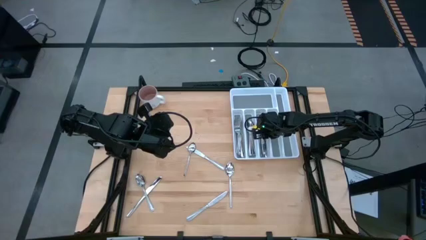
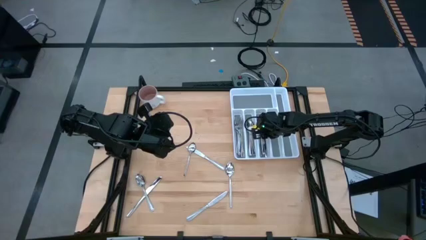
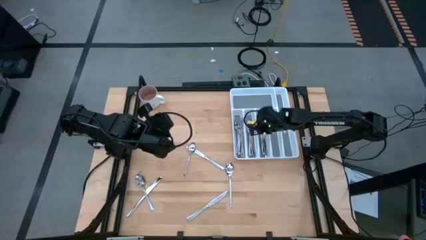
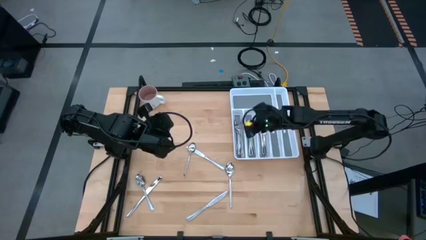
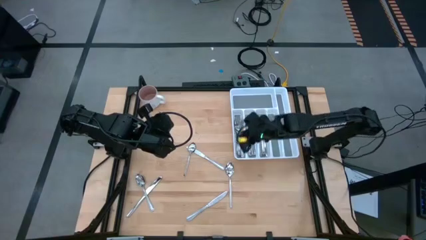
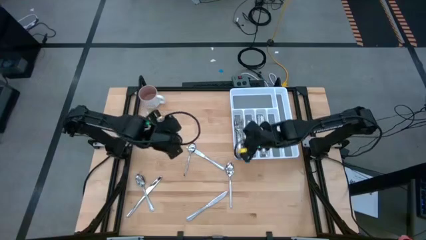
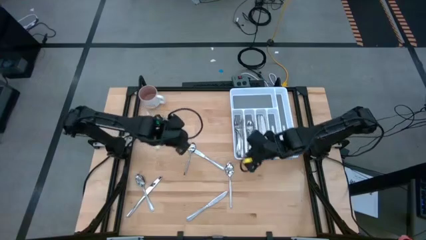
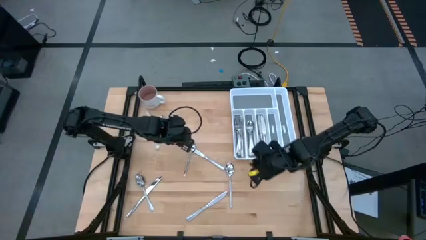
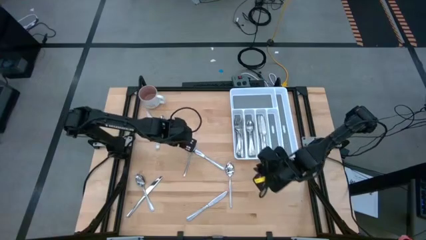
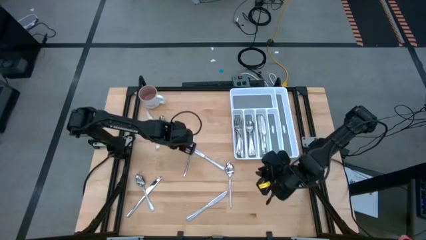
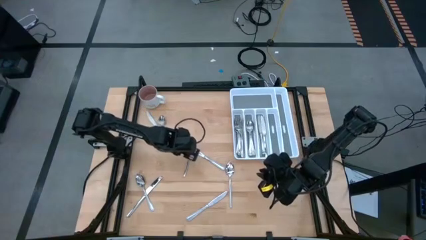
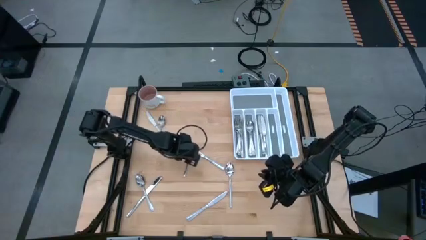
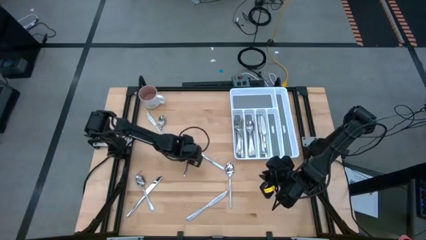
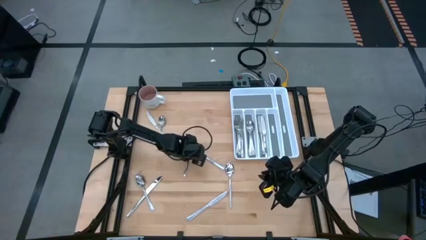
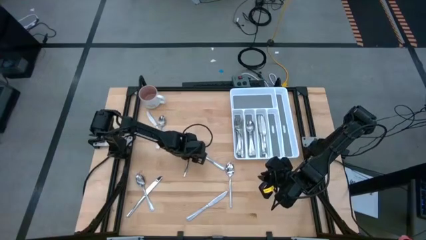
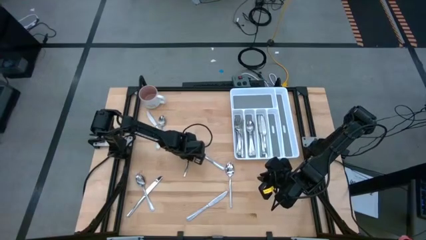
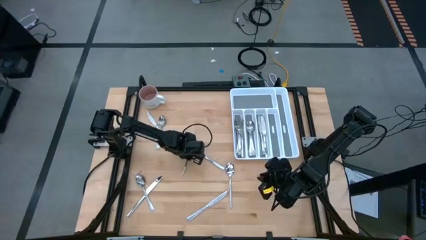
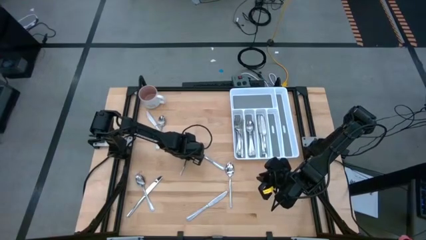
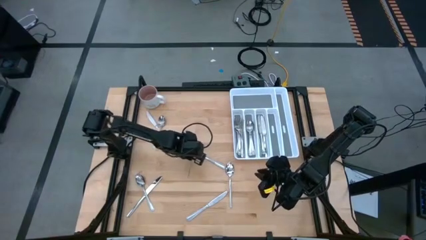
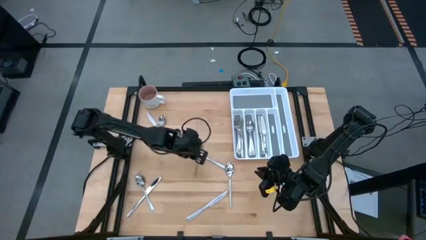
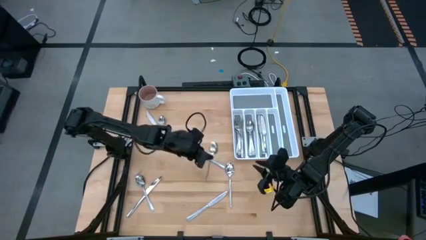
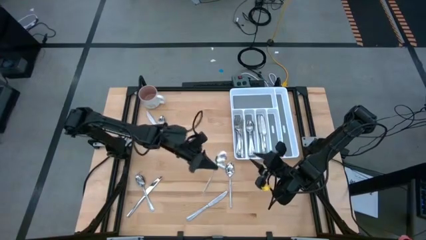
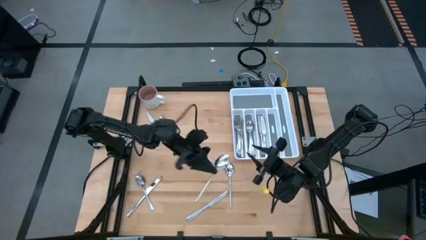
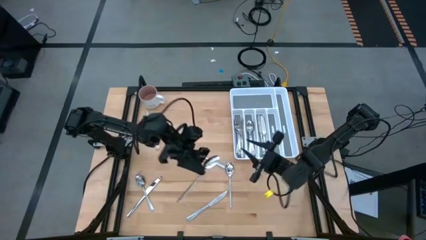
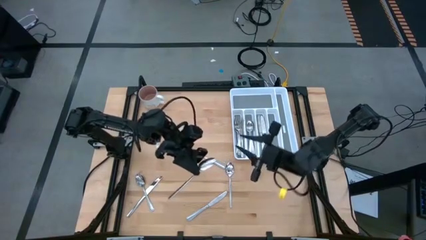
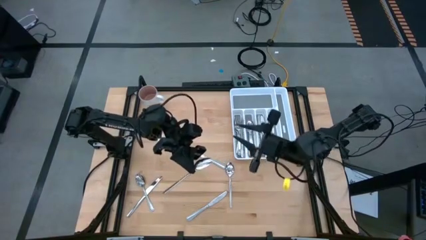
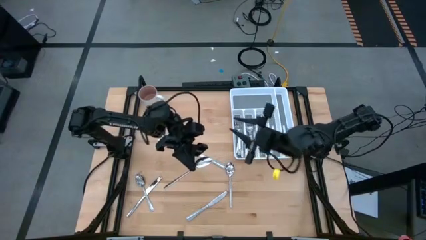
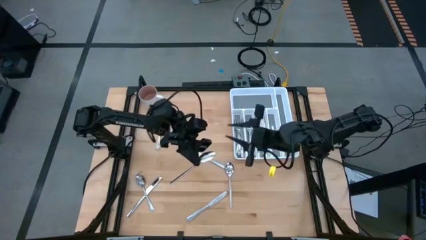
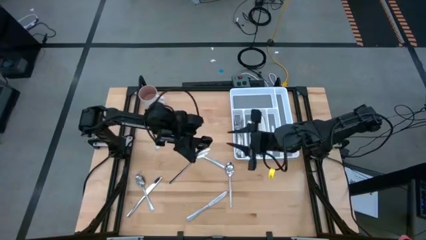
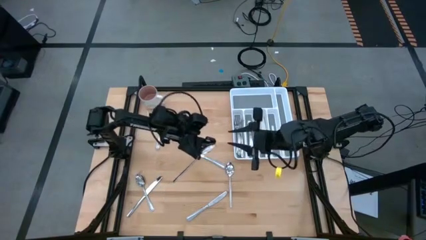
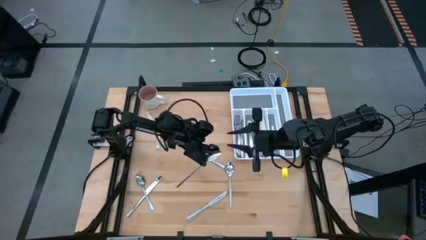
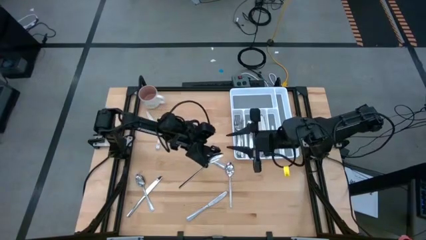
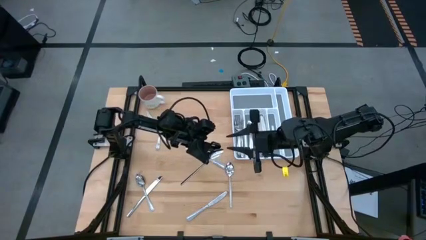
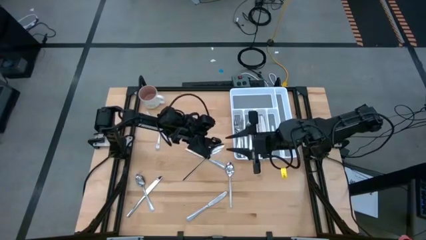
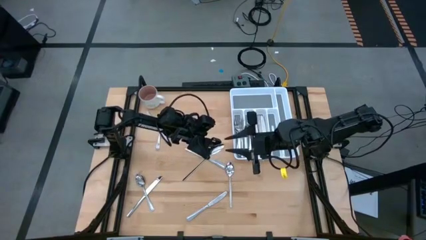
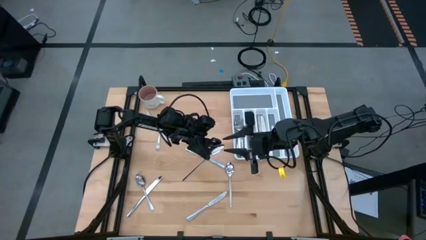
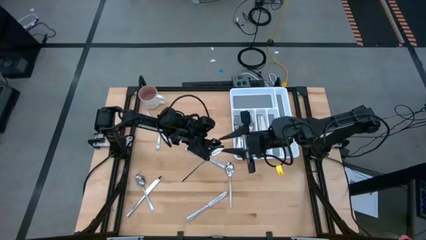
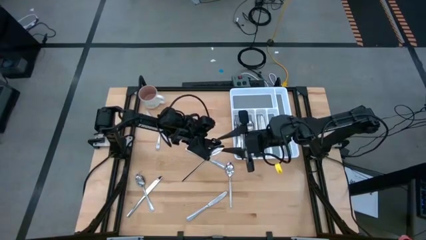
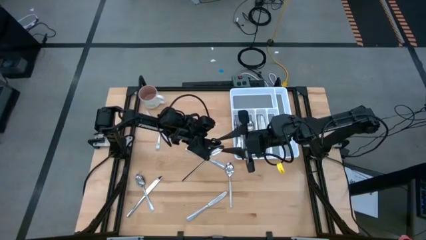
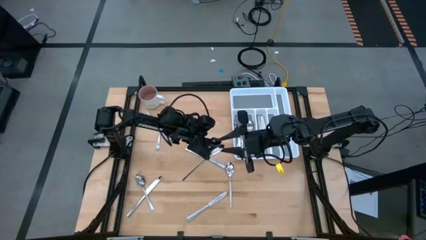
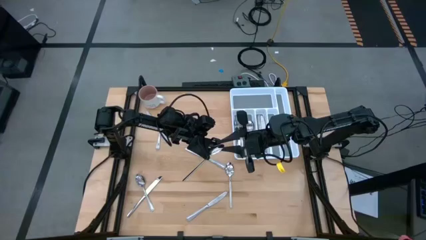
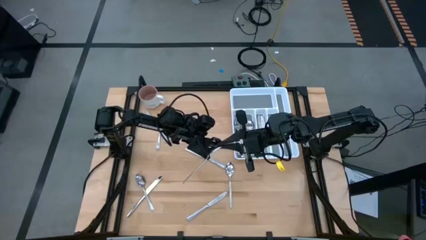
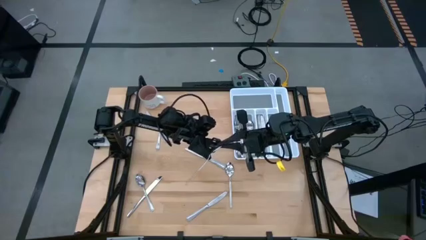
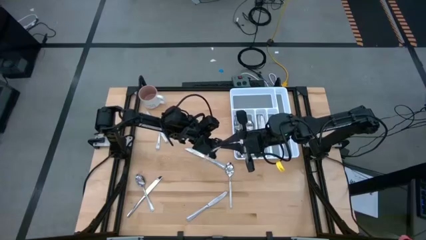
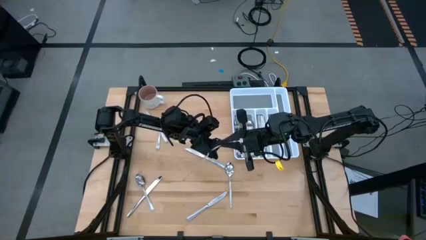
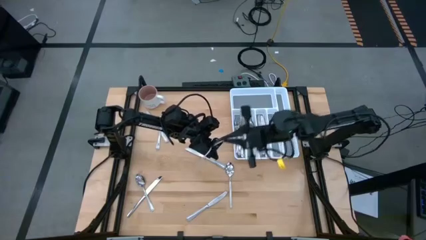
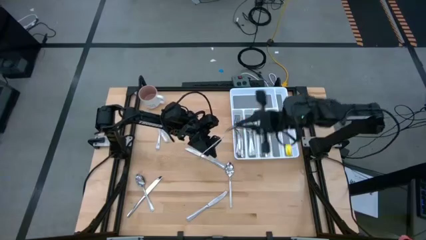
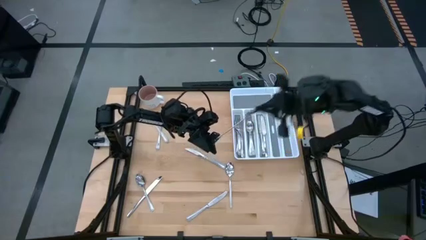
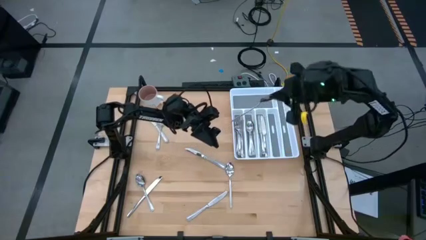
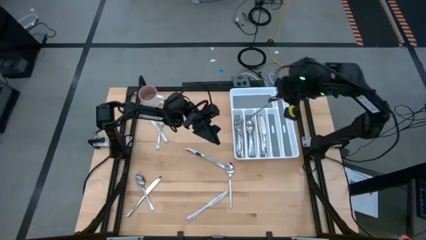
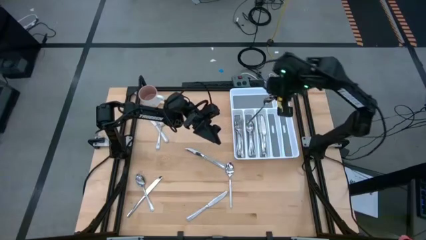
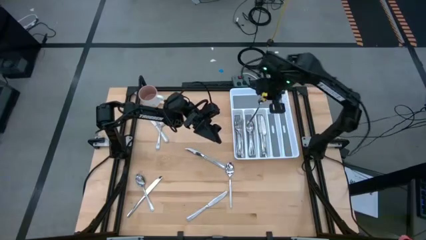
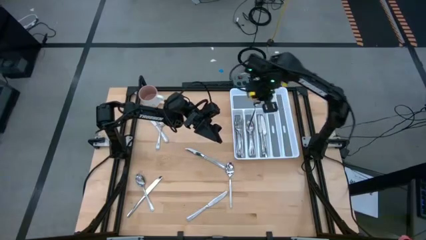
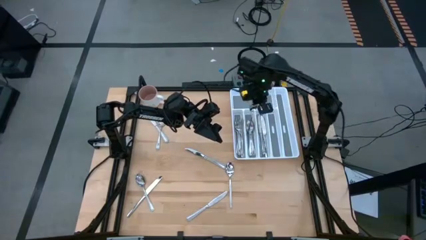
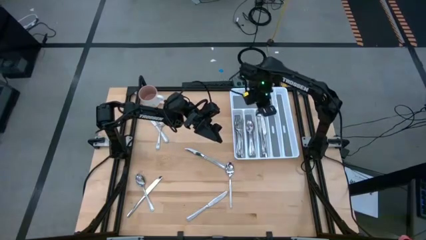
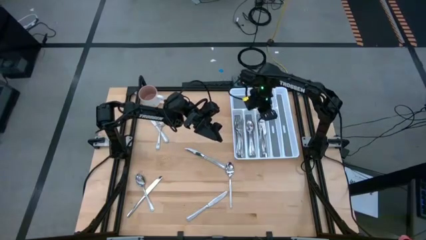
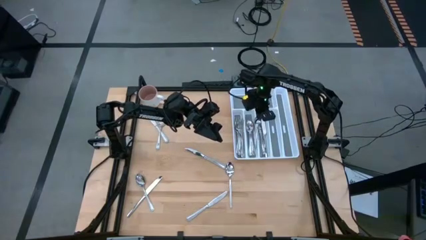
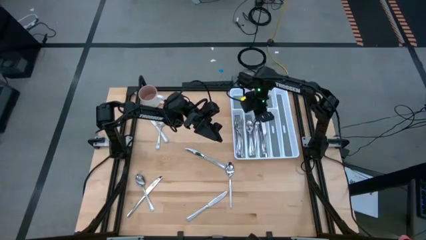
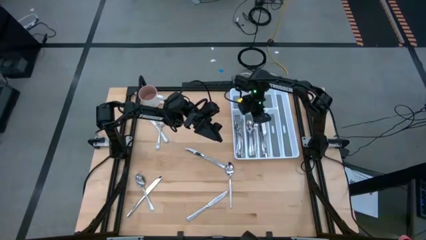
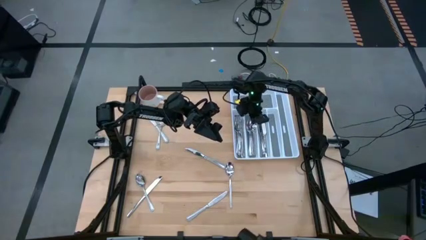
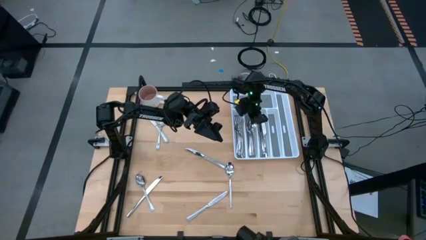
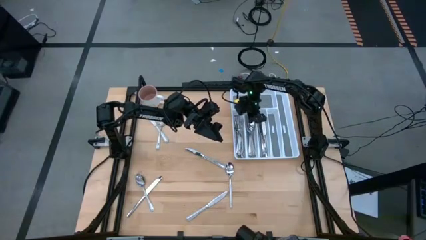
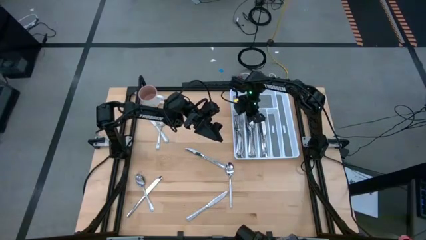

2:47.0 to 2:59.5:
Task: Sort silverware
Put the silver spoon into the silverware tray

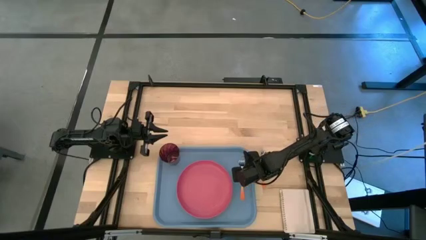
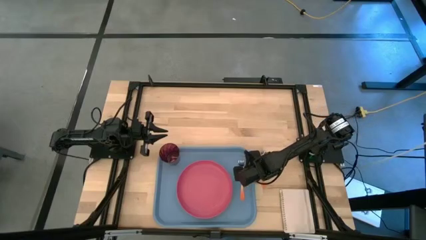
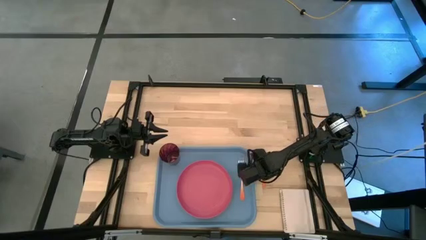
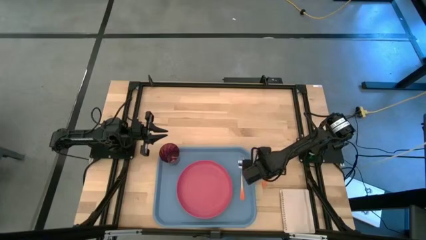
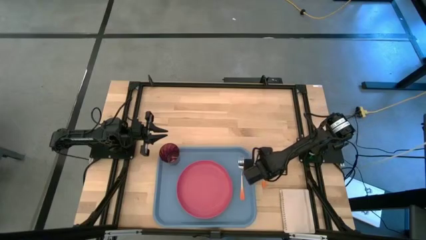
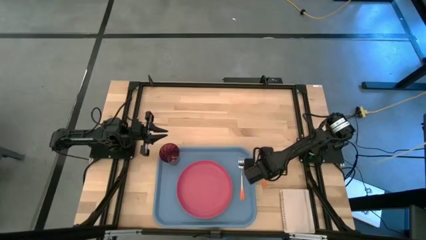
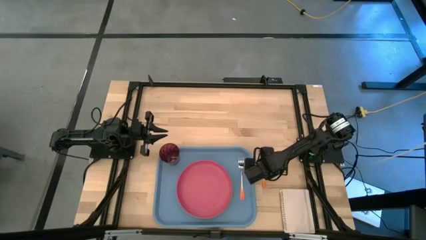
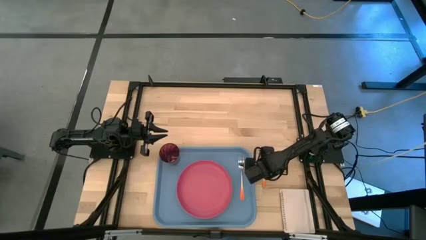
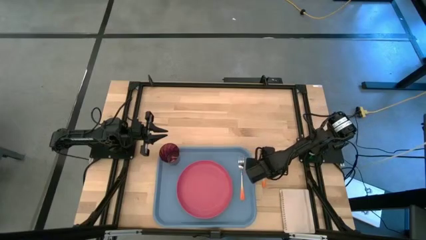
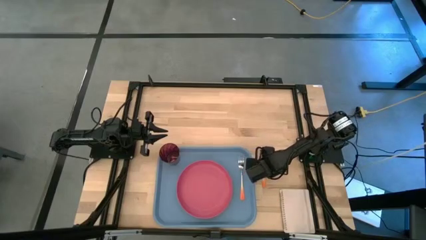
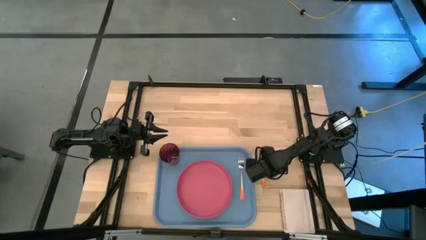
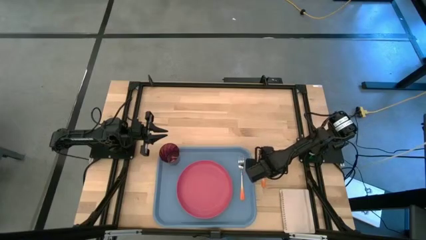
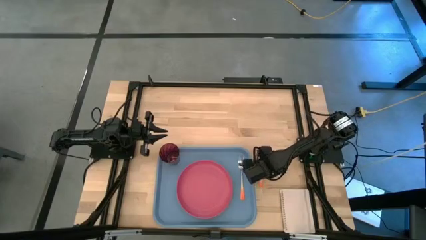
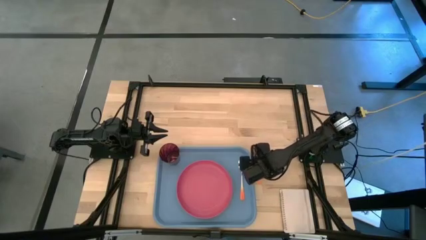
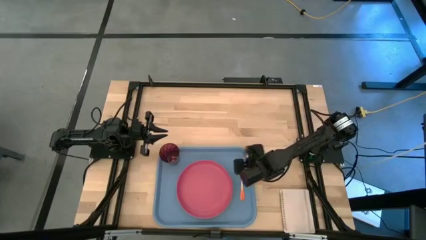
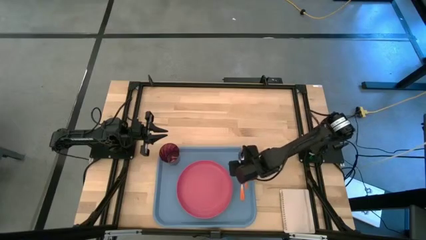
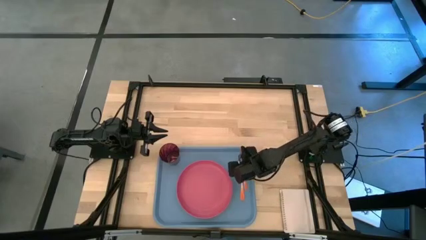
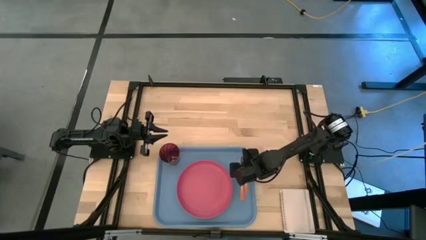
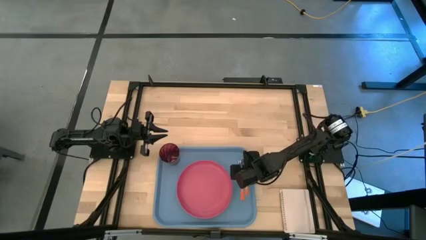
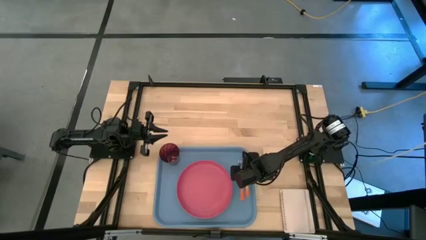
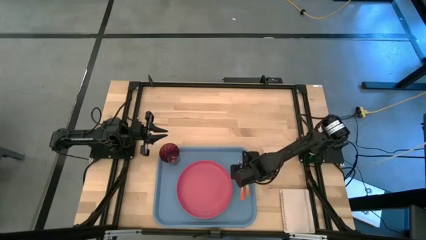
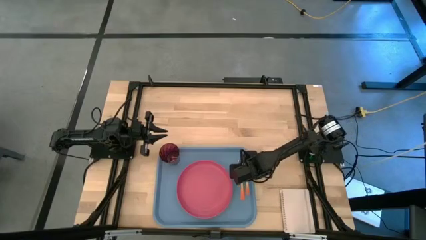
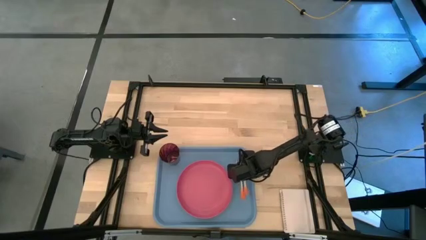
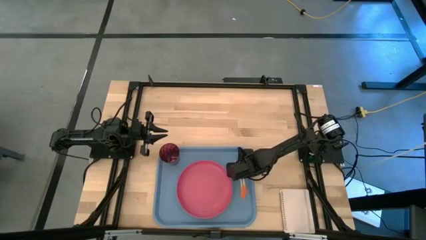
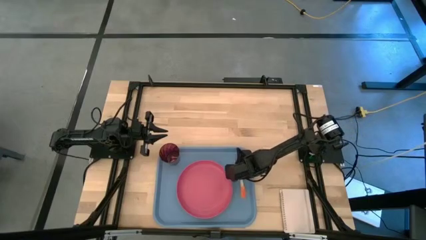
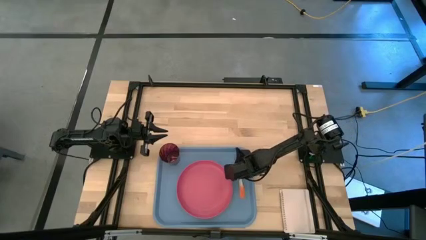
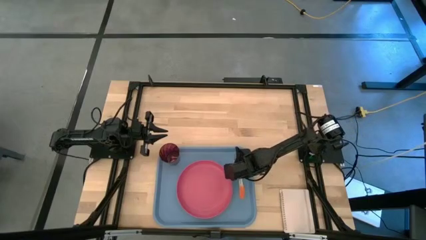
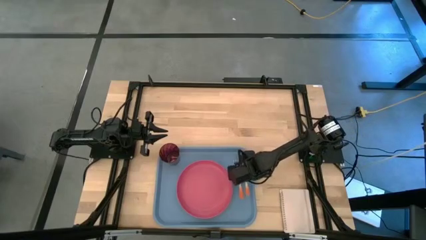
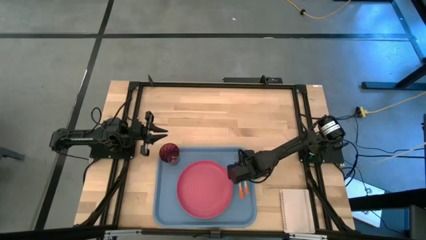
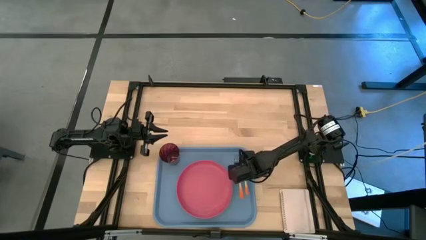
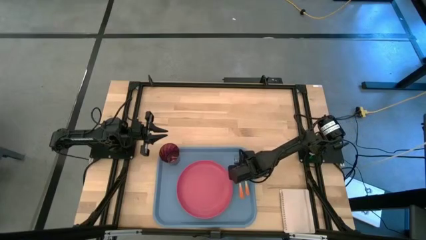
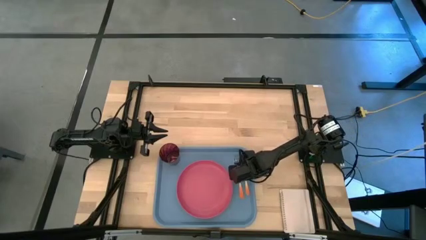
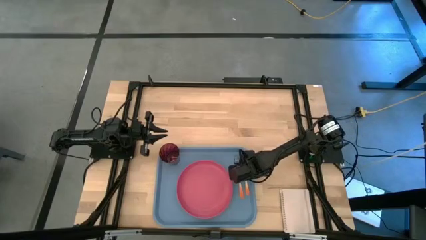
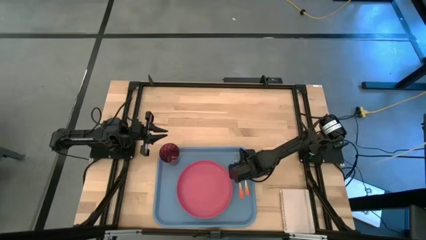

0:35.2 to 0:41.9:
Task: Pick and place plate/cup/fork/spoon on tray
Put the orange spoon on the serving tray to the right of the orange fork
